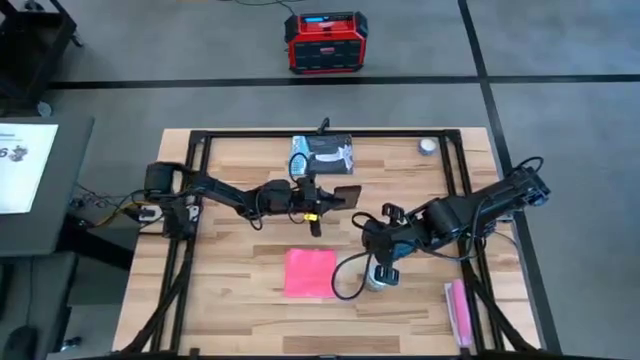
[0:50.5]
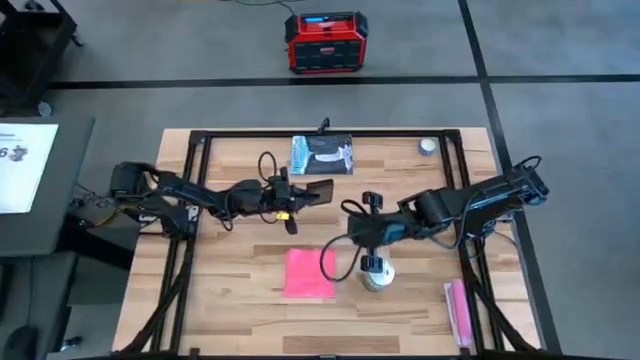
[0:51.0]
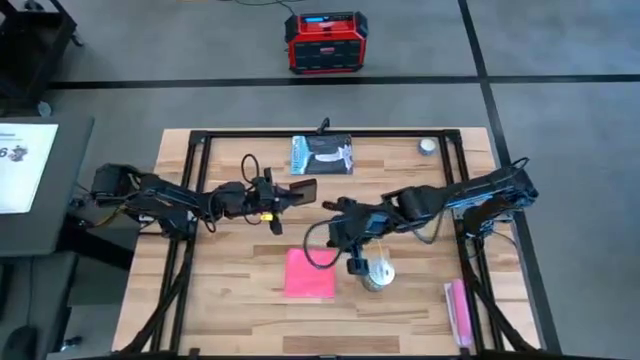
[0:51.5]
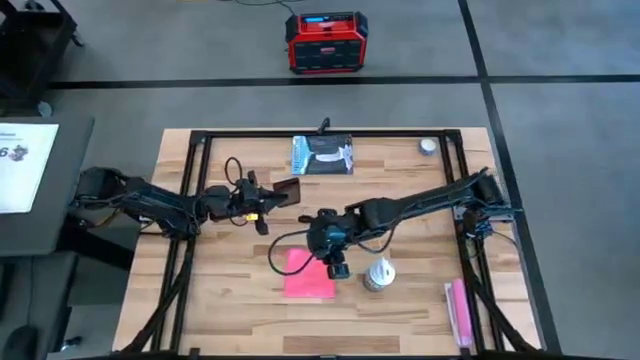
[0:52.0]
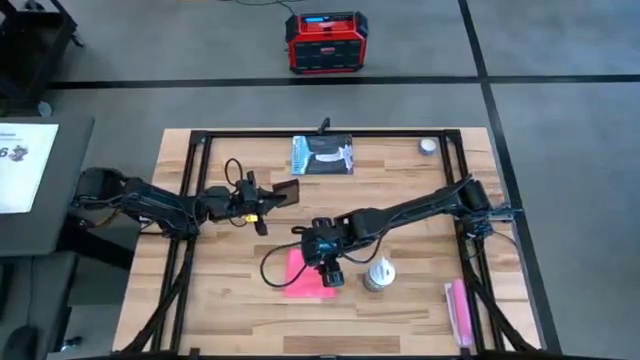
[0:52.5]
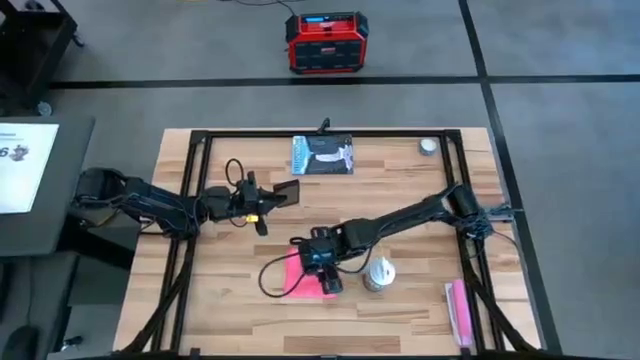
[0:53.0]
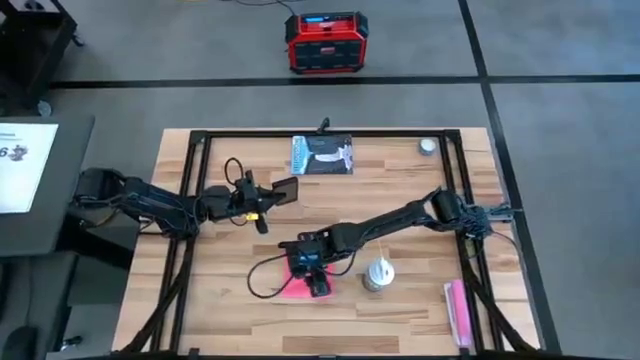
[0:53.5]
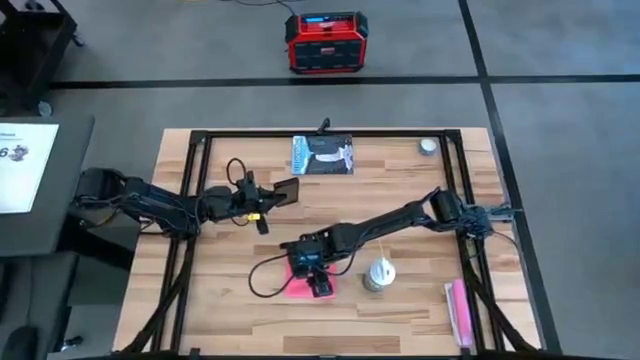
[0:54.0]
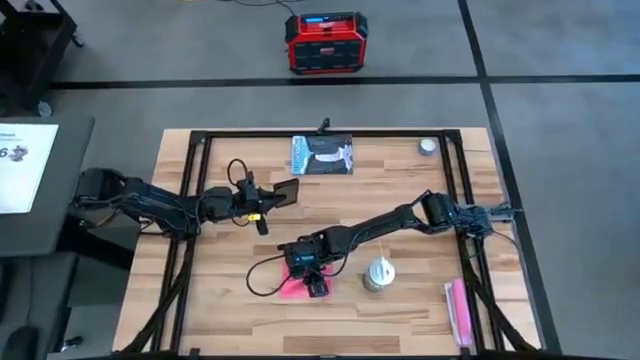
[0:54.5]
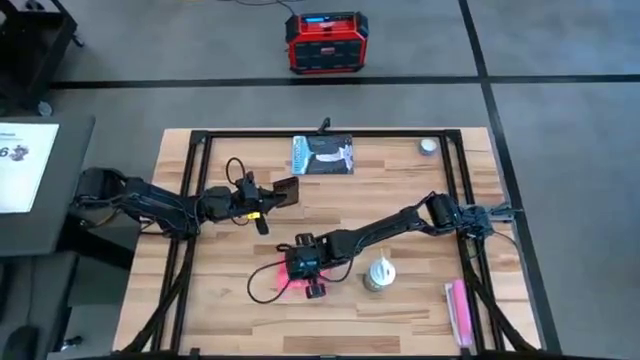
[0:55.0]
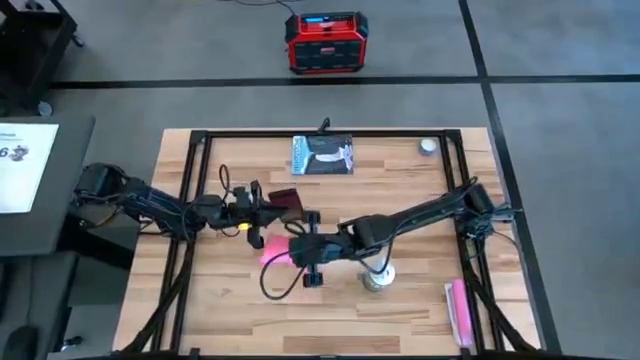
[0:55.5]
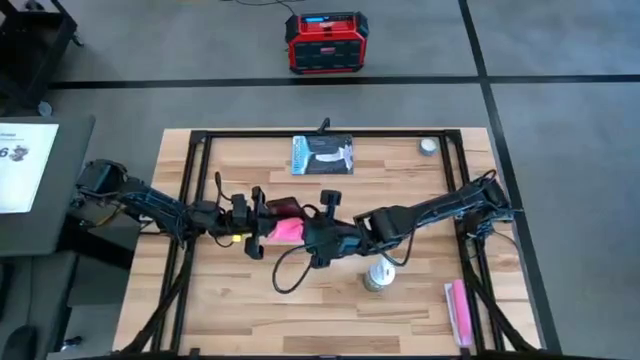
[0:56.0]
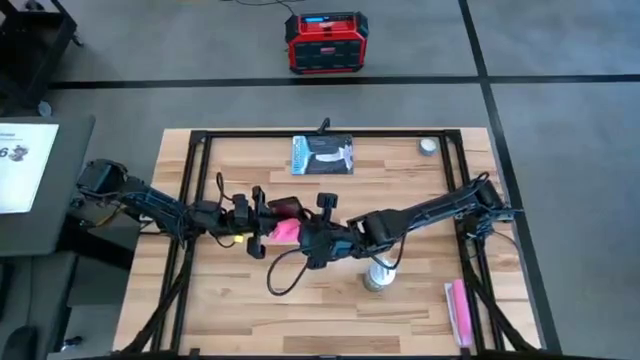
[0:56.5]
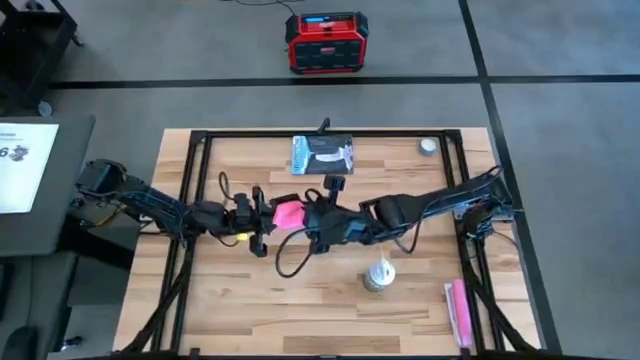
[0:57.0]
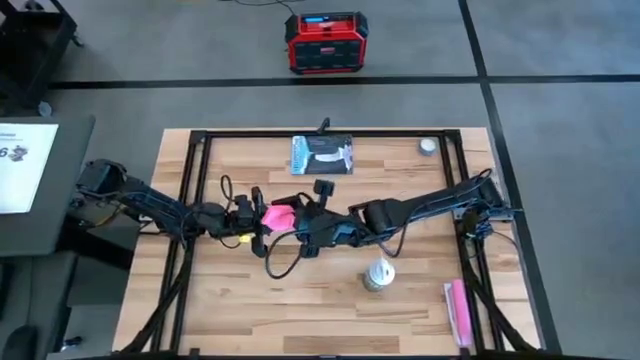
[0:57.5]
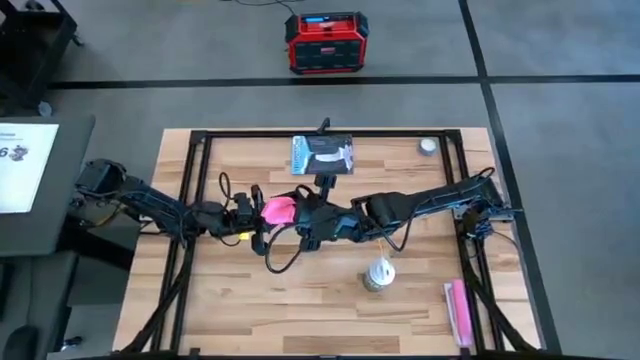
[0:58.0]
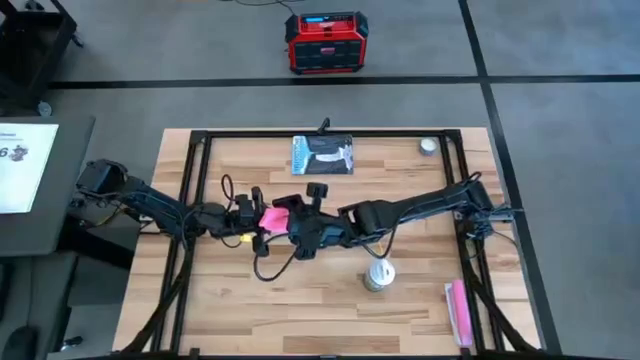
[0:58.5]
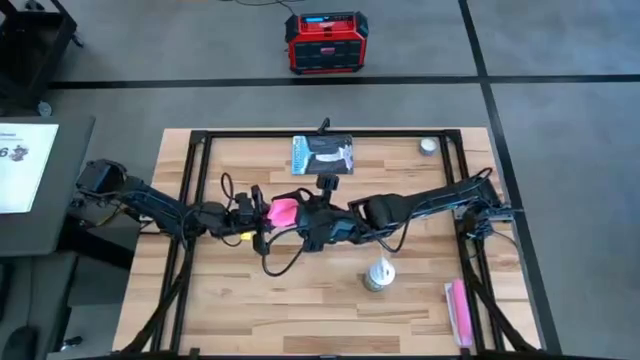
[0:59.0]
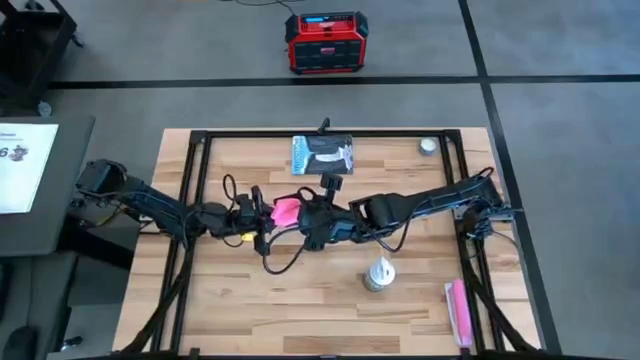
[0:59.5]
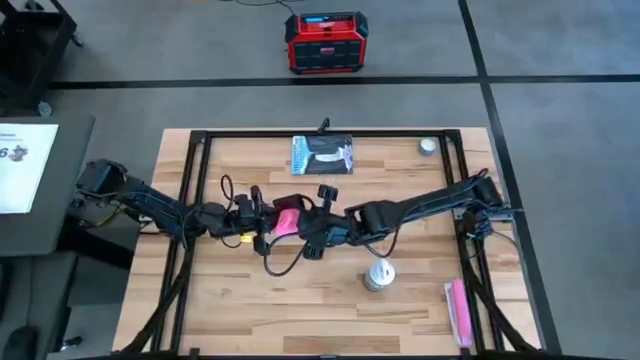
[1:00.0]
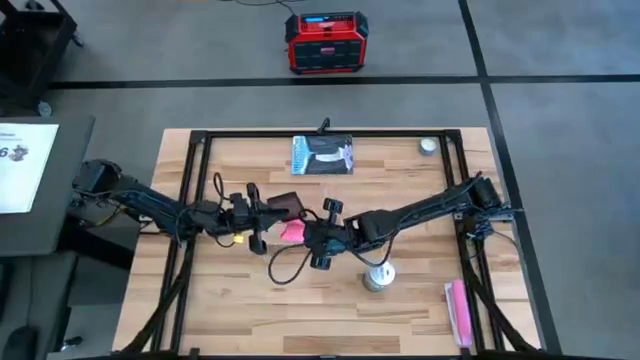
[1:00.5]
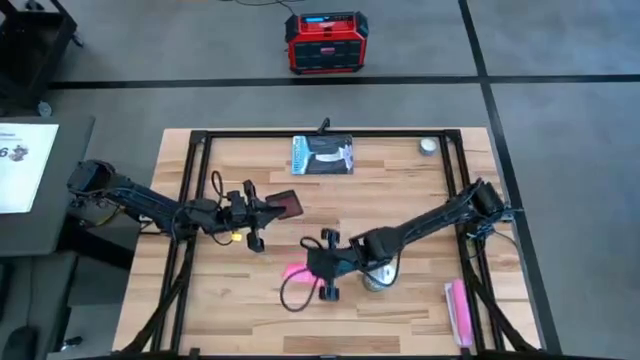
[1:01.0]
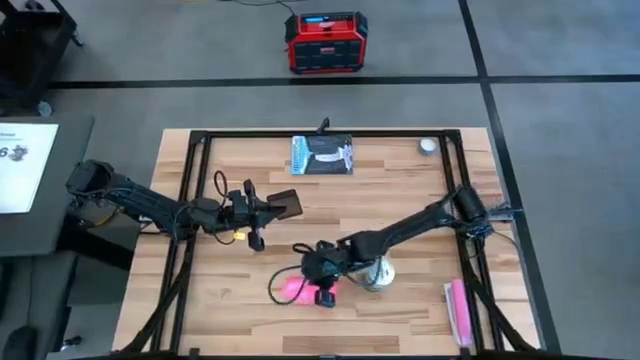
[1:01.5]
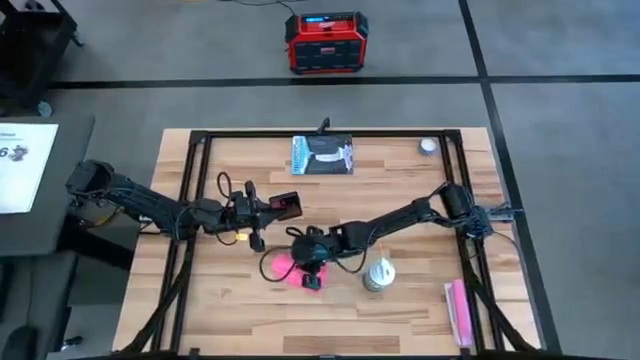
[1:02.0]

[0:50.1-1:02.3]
Task: Apply microfiber cloth
Wipe the front of the cellphone with the pink microfiber cloth

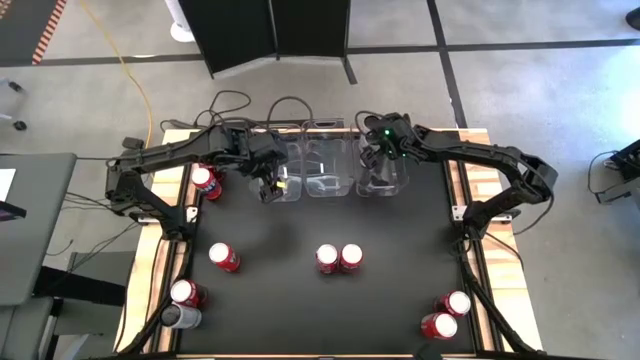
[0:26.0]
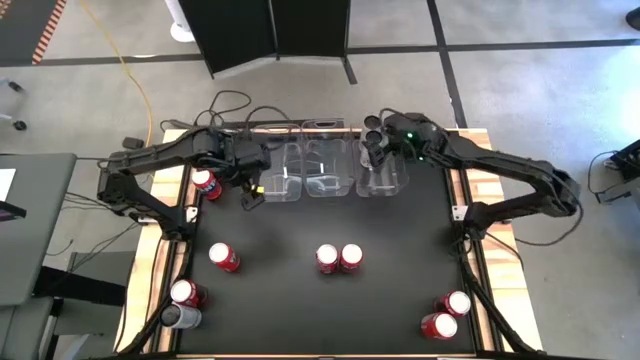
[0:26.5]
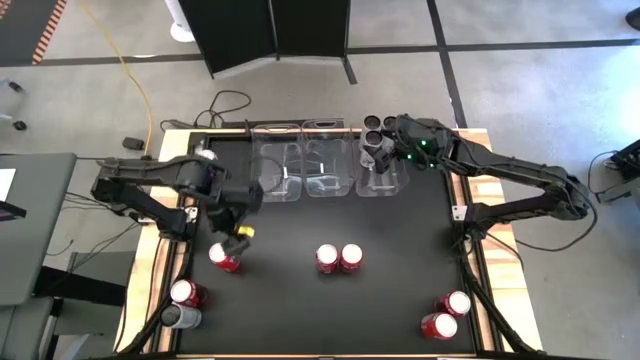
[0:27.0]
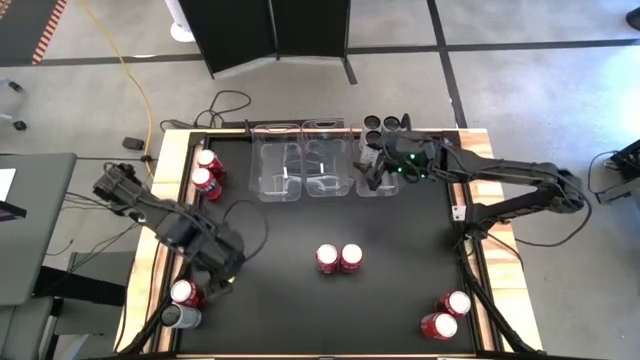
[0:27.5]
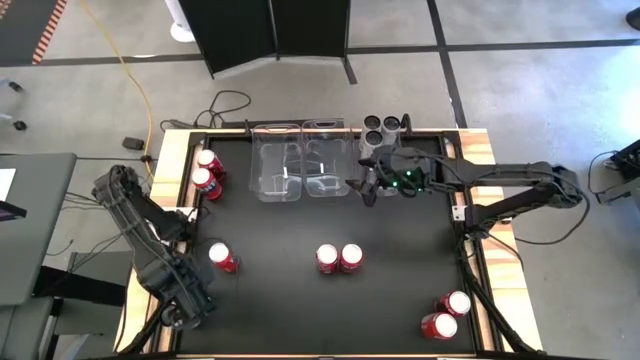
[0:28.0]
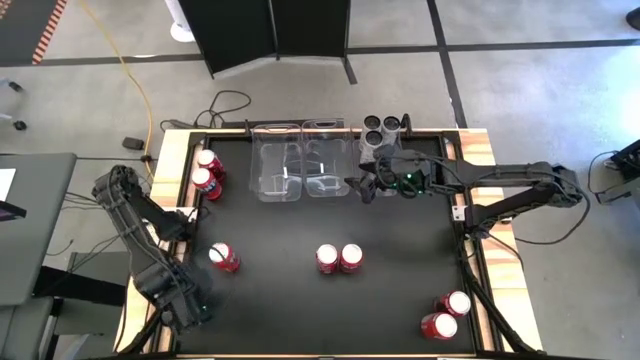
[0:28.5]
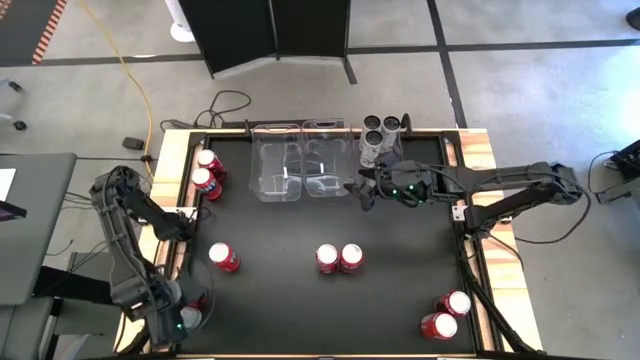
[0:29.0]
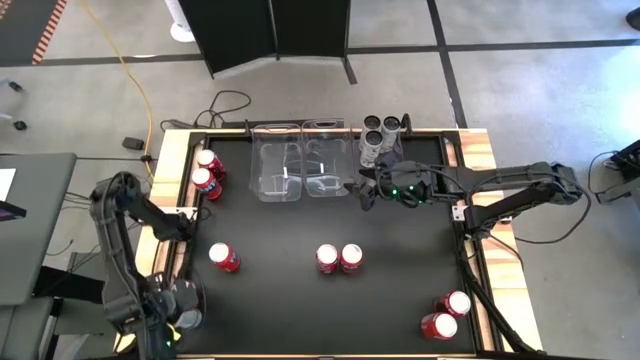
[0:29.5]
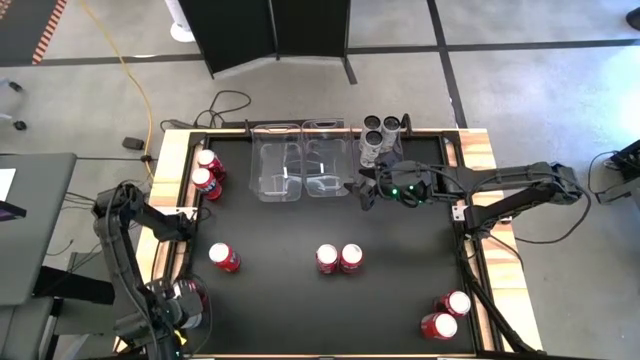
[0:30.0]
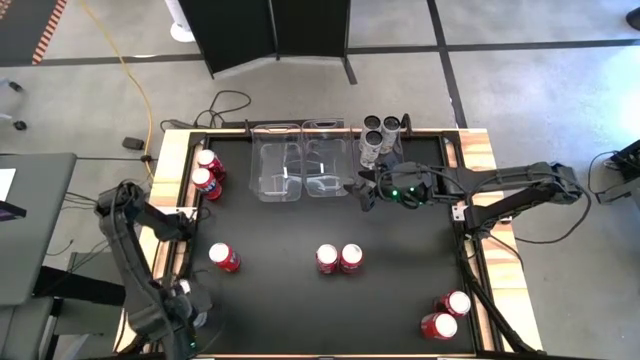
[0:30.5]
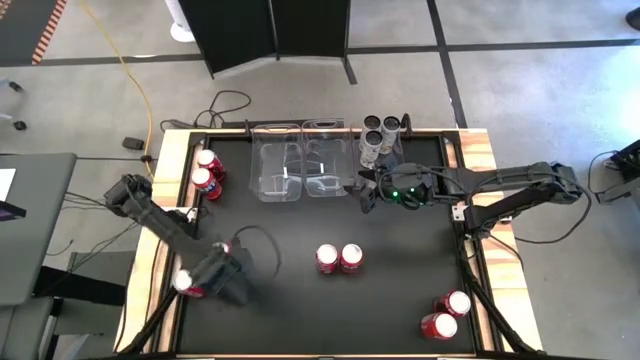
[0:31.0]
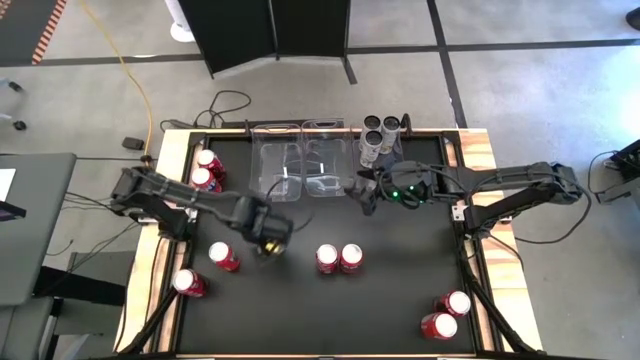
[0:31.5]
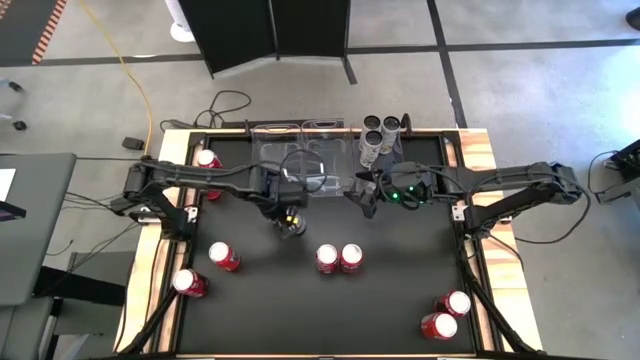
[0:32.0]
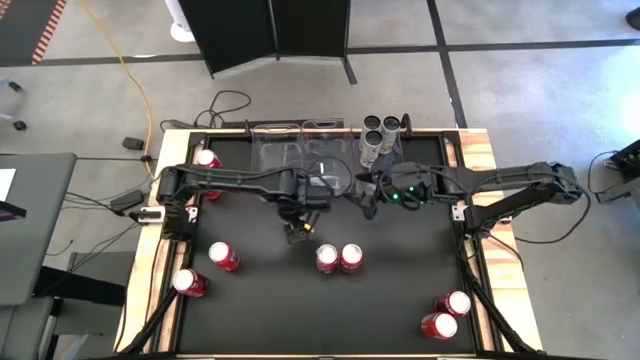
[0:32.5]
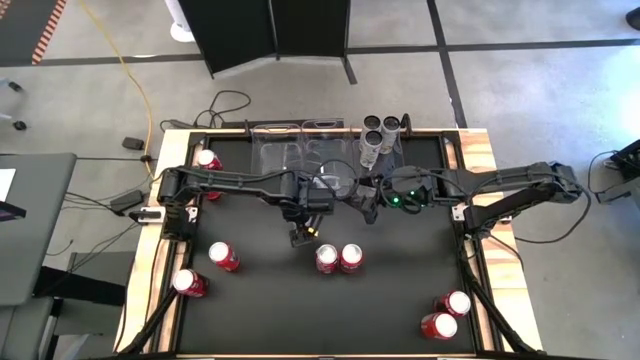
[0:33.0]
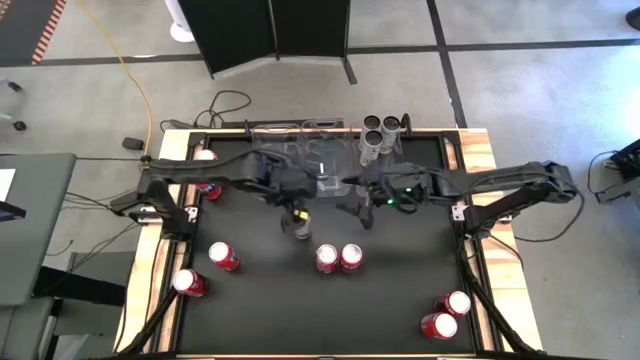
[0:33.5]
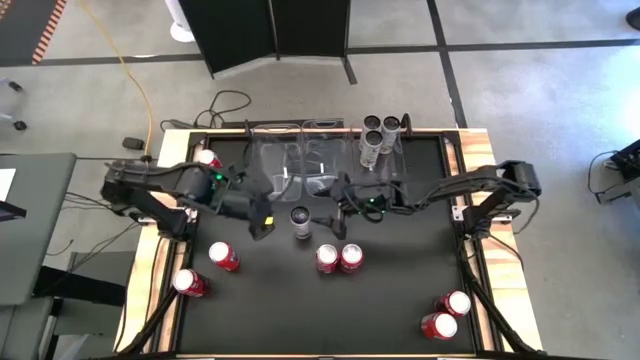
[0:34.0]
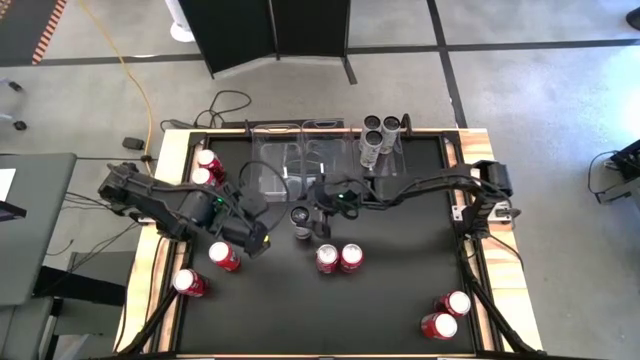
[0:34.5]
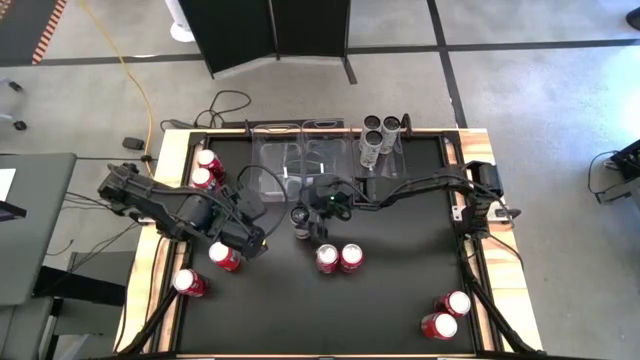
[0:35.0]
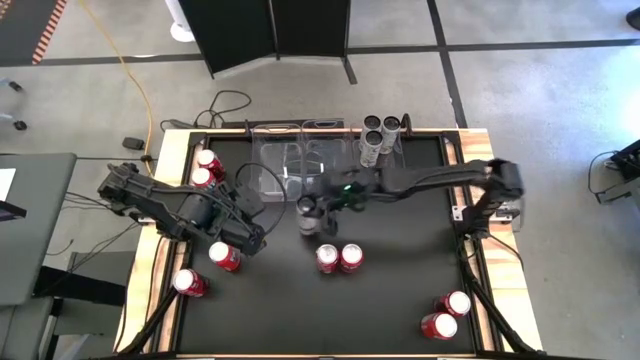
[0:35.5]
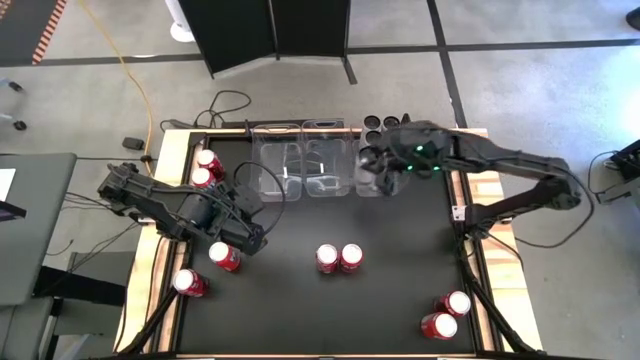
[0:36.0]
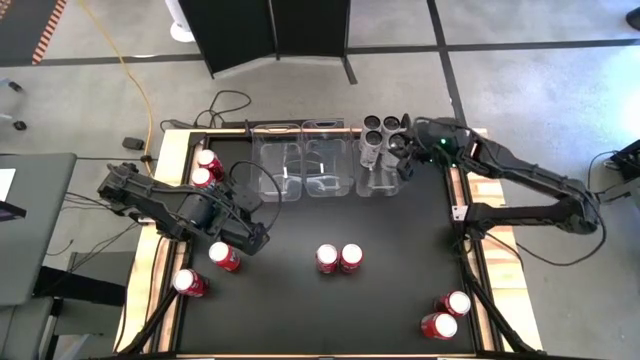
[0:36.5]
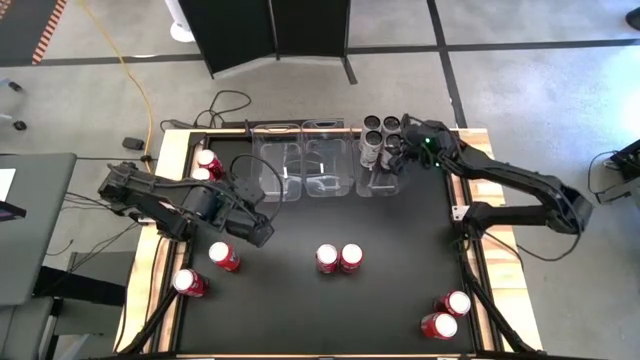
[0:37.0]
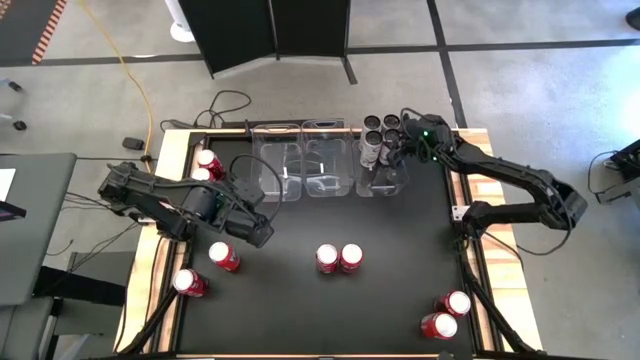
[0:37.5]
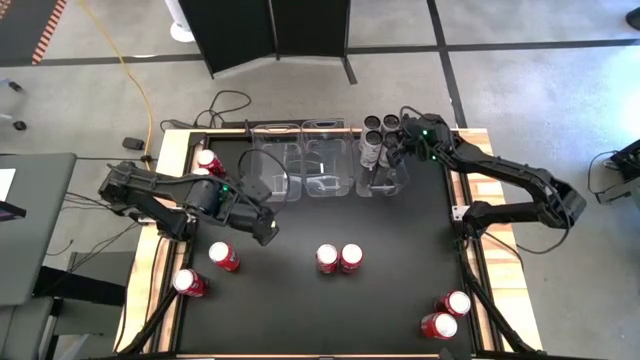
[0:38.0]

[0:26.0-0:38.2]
Task: Sort soda cans
Put the white-yellow soda can into the right transparent bin
